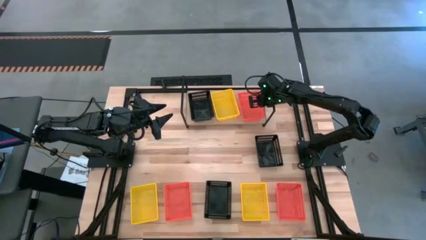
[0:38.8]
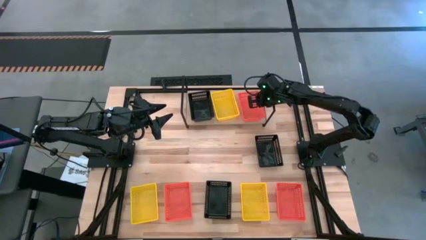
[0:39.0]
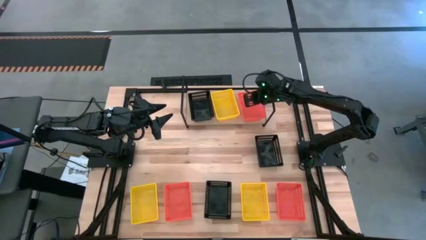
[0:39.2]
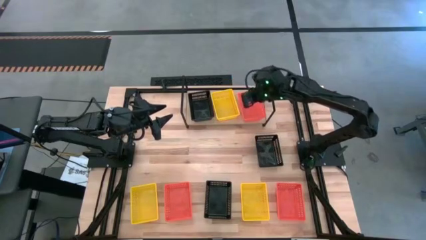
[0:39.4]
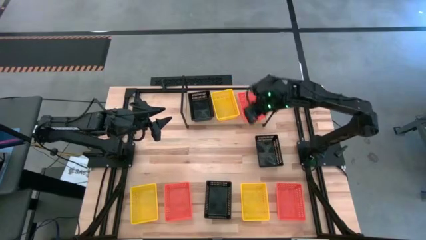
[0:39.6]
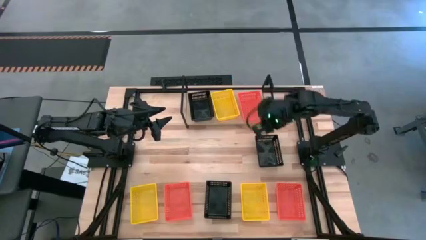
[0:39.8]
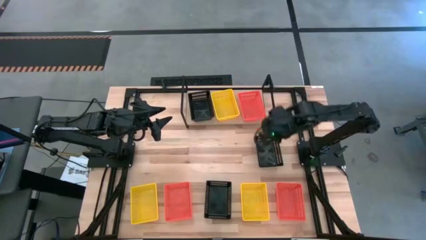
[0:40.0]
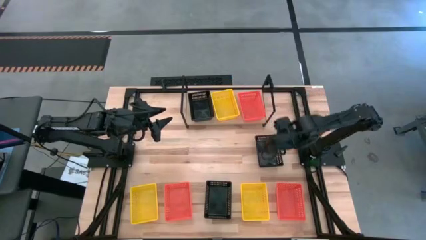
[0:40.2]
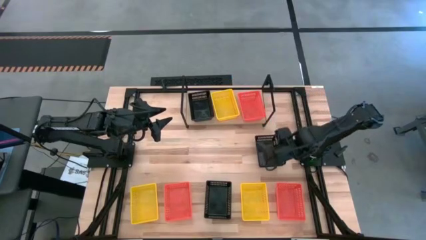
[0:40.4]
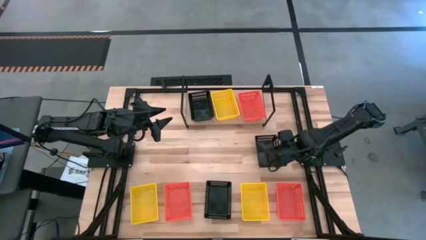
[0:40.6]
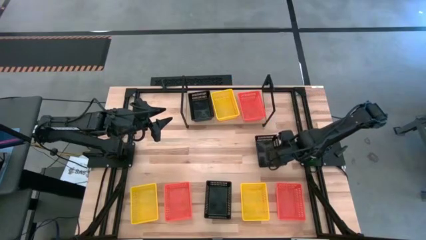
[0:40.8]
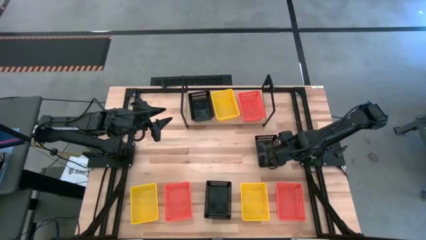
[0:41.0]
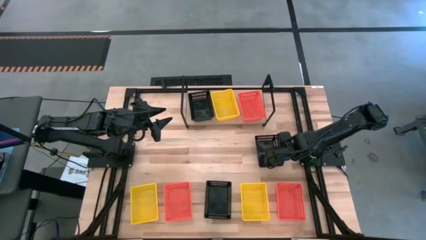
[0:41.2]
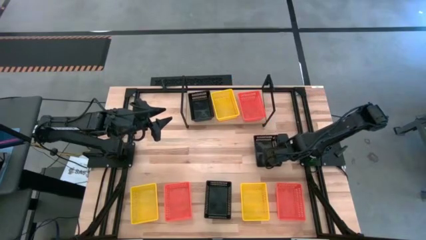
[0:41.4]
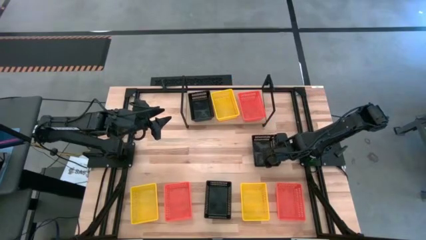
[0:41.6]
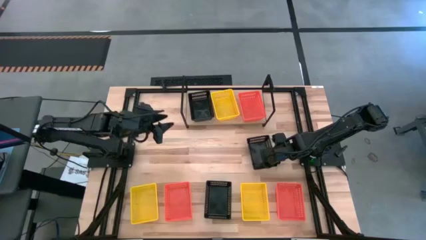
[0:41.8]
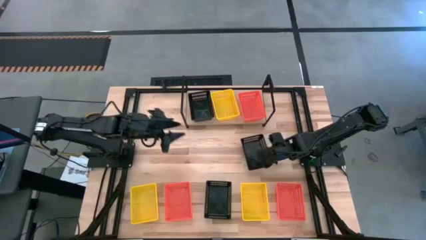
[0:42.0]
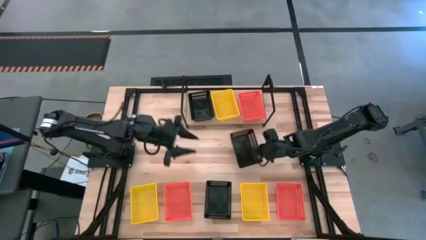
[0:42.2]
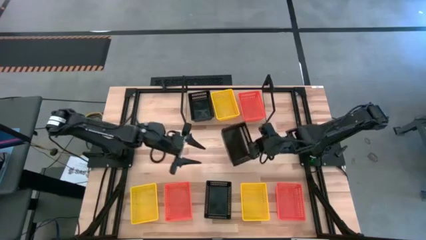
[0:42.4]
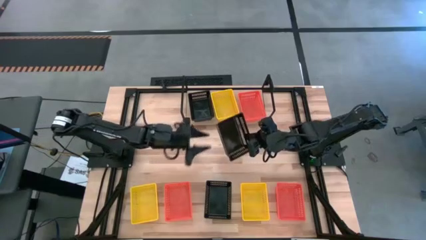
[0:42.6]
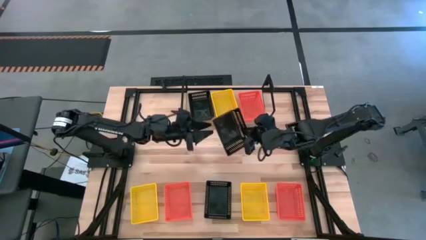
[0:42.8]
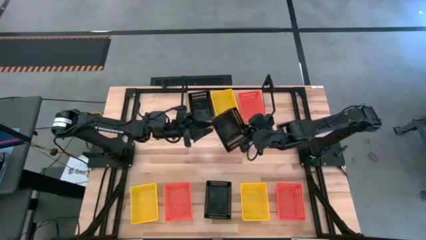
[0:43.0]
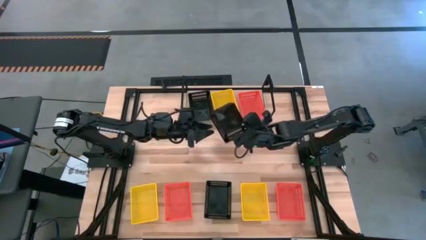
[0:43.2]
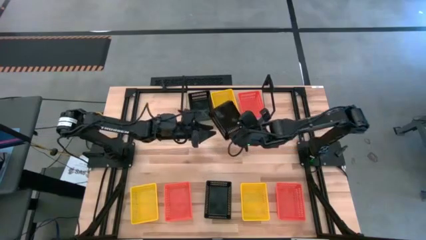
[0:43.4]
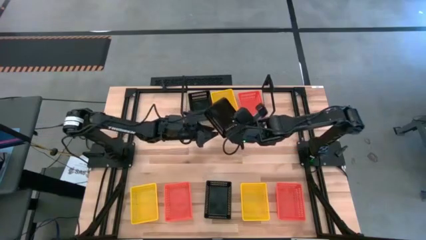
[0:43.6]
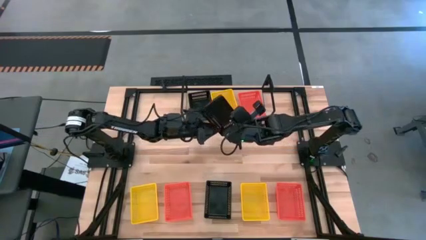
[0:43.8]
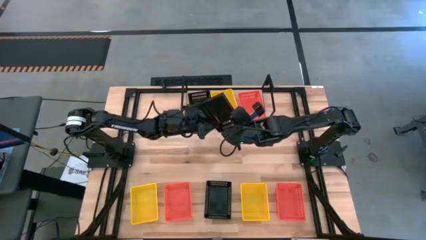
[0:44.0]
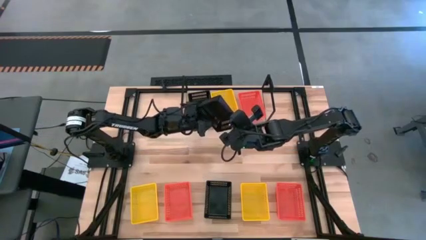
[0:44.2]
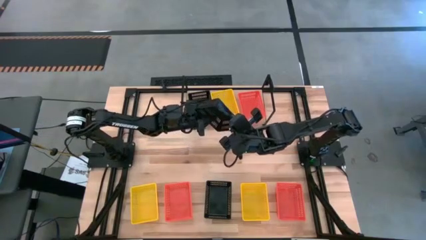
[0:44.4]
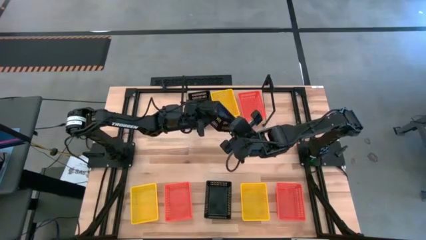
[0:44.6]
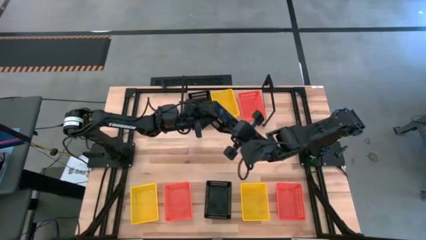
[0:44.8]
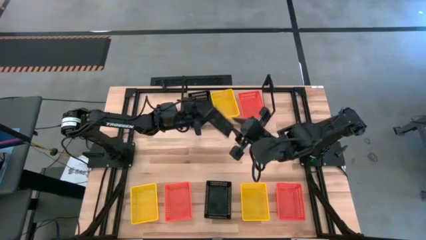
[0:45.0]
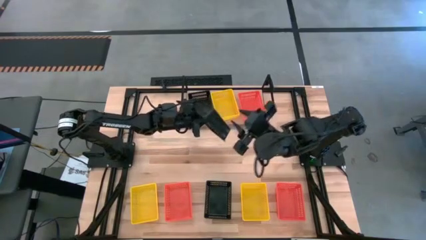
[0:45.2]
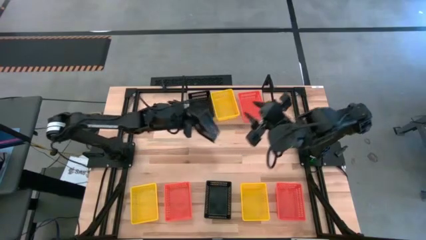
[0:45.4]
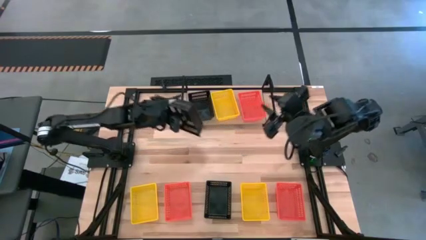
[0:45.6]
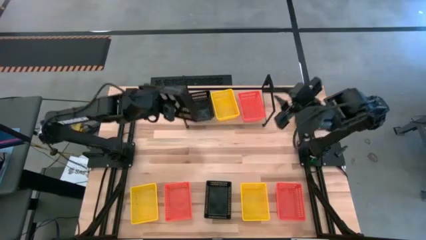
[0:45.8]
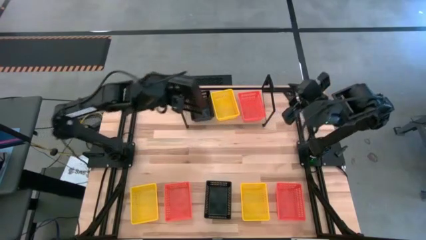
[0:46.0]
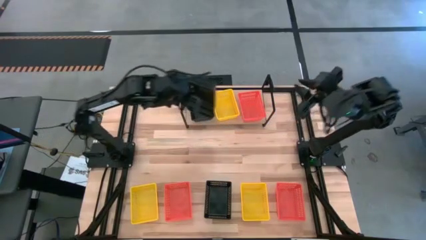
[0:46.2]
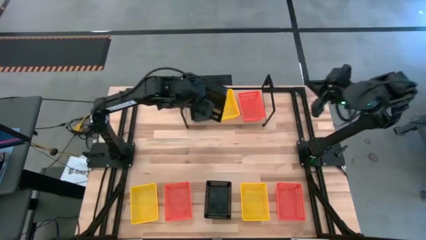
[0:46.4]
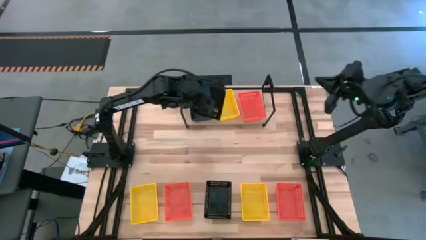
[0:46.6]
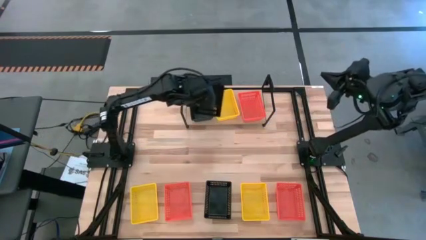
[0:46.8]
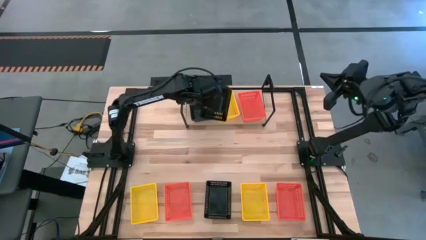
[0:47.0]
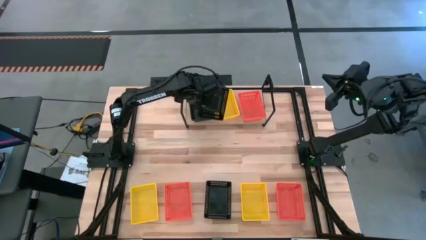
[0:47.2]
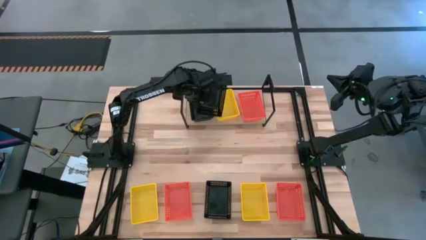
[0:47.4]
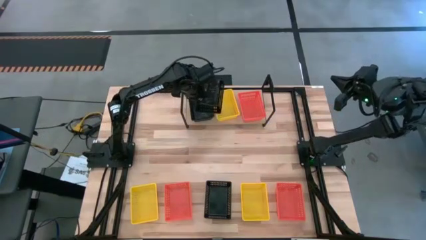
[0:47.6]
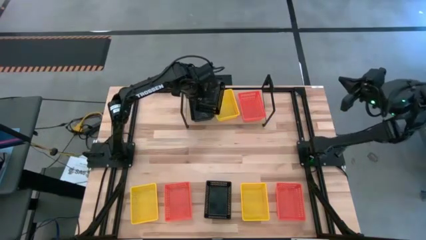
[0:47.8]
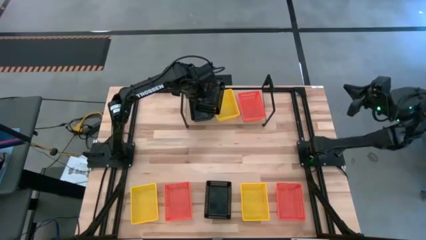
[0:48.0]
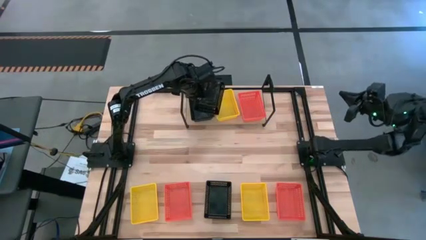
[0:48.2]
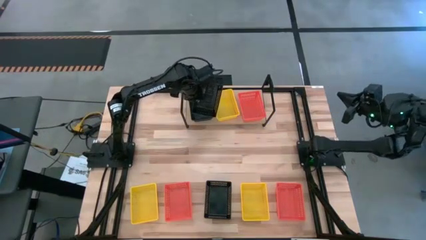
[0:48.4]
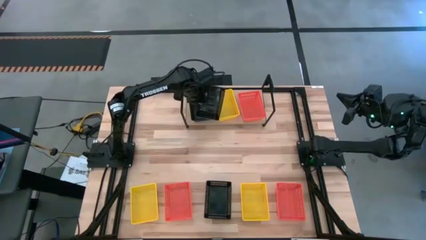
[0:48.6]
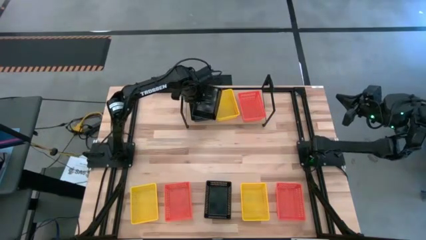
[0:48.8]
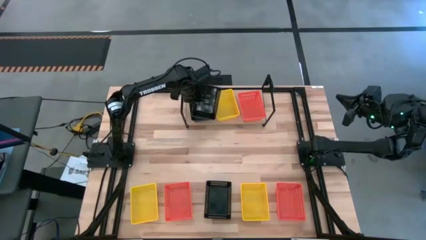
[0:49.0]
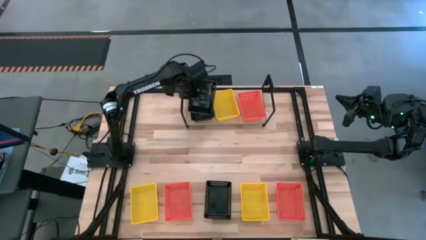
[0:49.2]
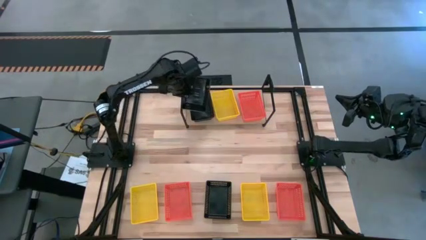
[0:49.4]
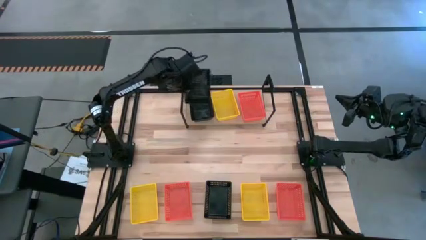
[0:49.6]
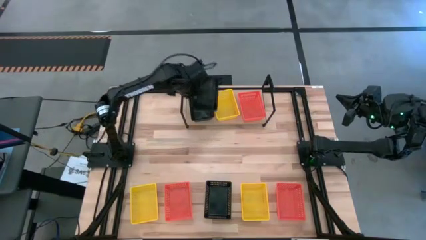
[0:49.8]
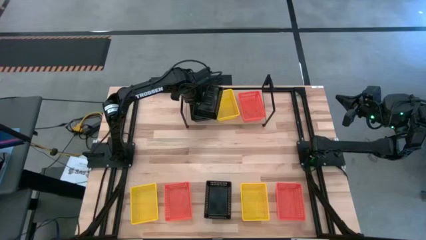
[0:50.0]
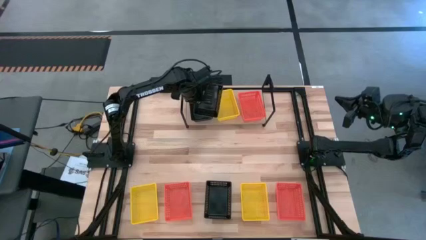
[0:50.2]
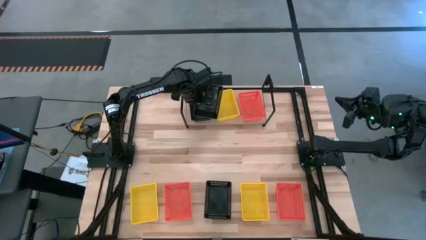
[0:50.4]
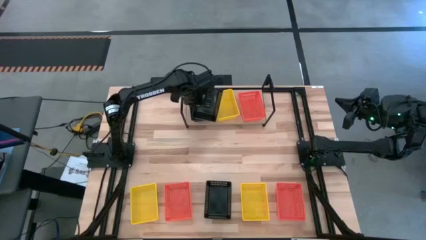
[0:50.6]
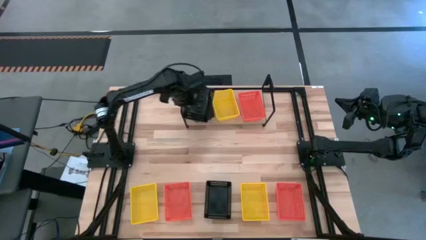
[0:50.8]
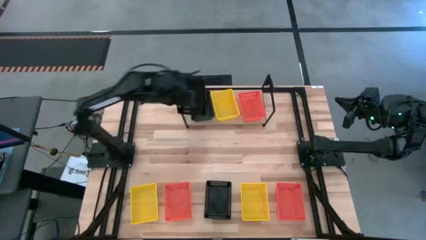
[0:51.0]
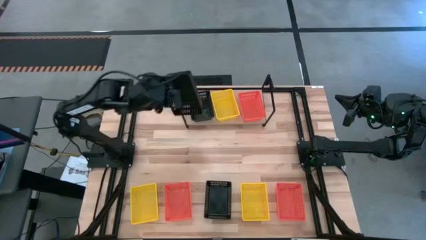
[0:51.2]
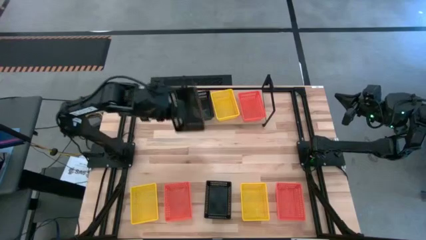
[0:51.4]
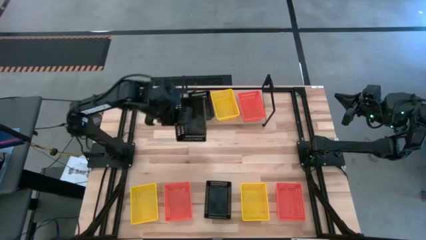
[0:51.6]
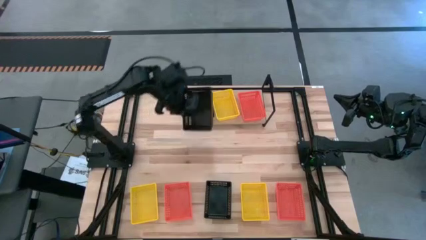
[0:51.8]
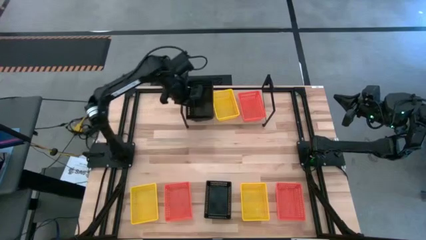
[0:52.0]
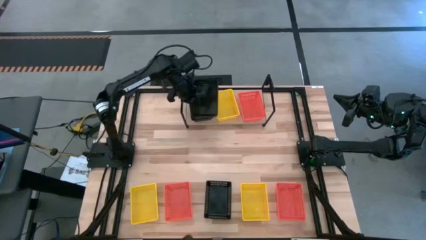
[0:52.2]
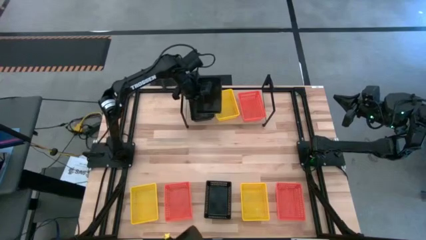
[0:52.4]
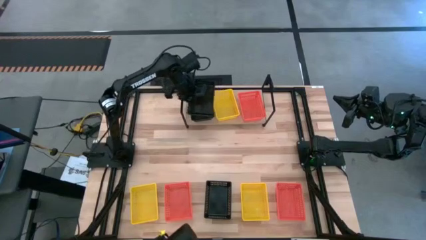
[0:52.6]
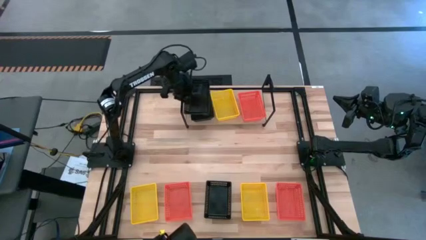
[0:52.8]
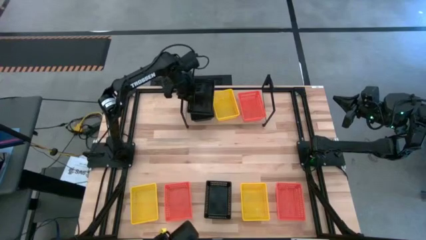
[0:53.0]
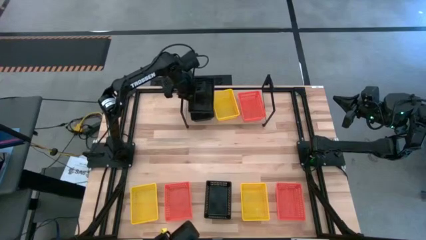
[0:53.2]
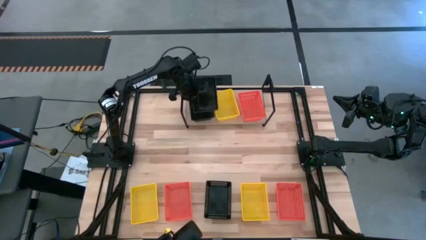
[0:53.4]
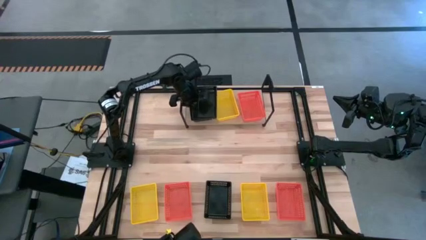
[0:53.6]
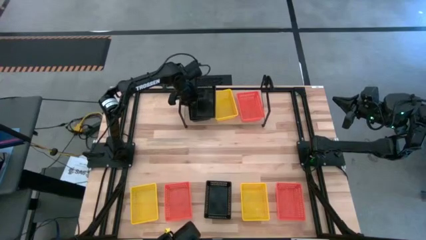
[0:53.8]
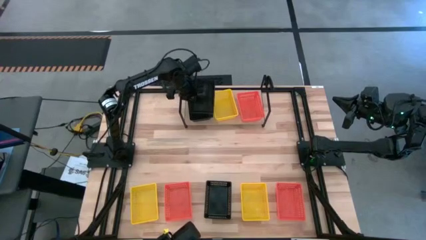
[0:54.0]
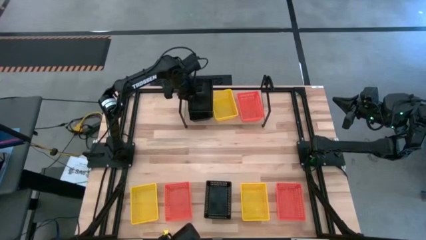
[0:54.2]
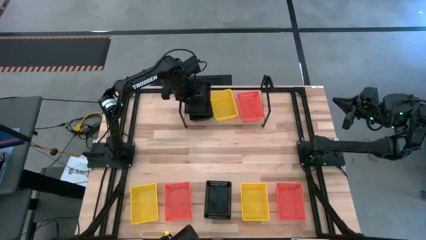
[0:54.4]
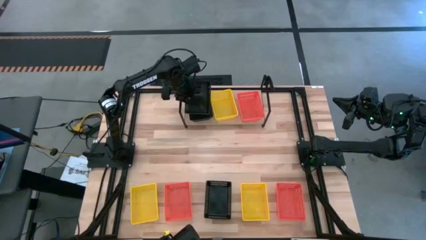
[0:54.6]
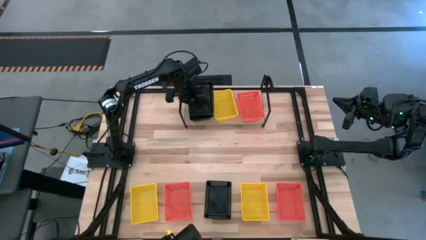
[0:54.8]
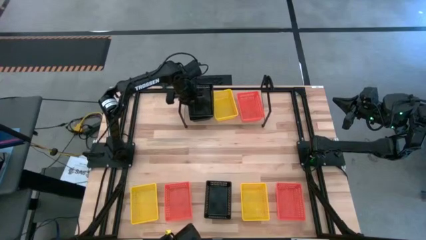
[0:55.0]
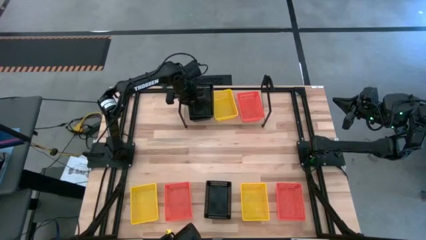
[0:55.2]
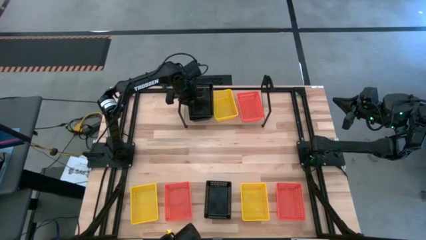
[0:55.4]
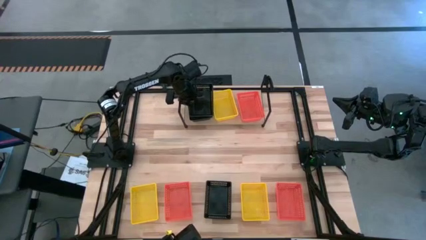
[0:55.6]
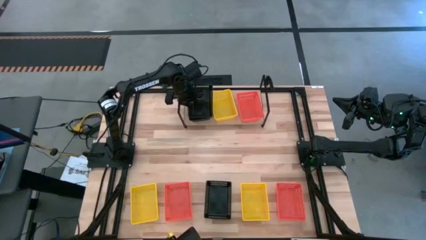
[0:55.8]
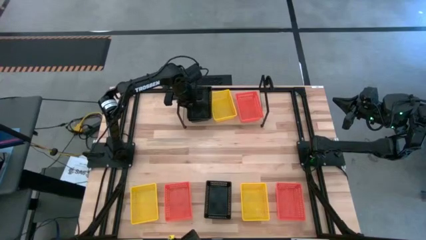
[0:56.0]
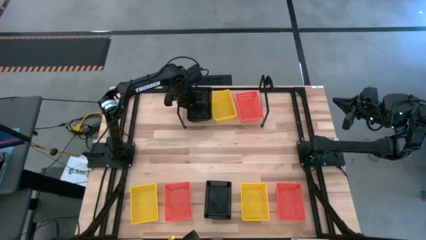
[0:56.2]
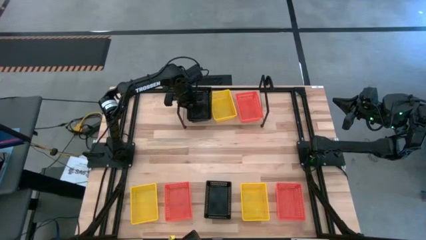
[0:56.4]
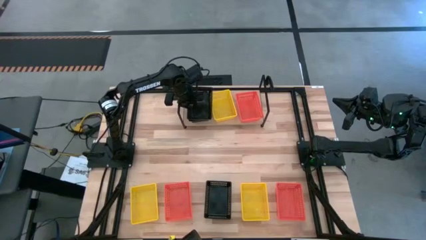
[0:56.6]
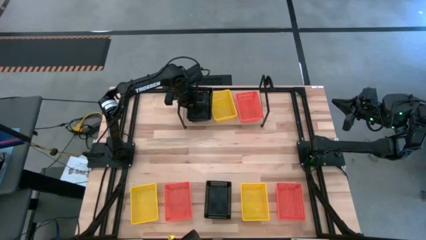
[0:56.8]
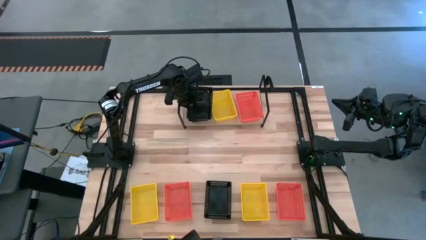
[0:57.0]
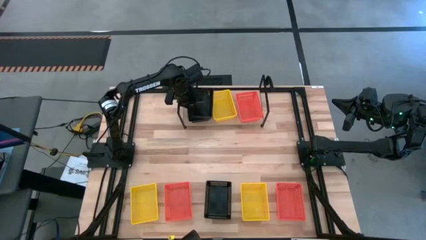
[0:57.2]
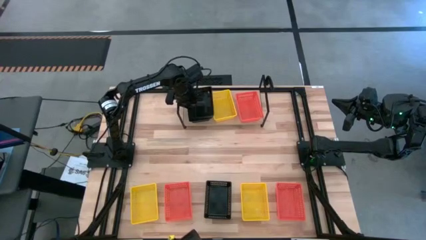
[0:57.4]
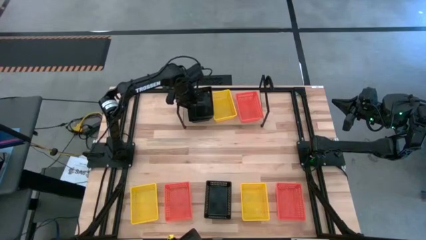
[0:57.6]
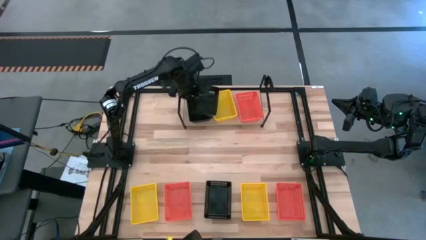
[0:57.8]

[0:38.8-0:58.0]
Task: Stack baskets on shelf by color
Stack the right black bin on top of the other the black bin on the shelf
